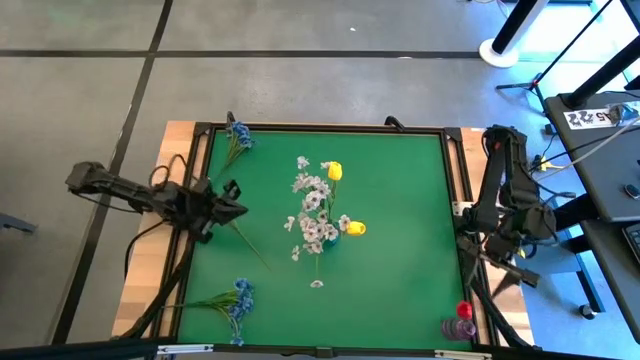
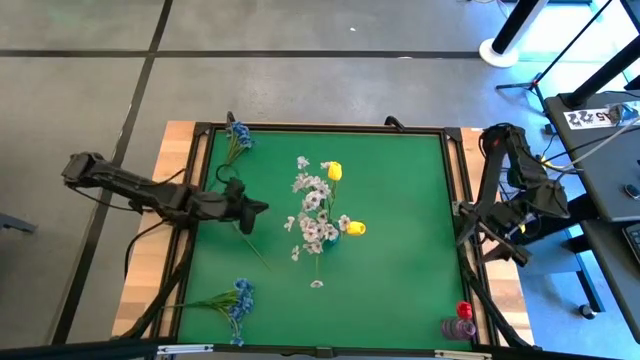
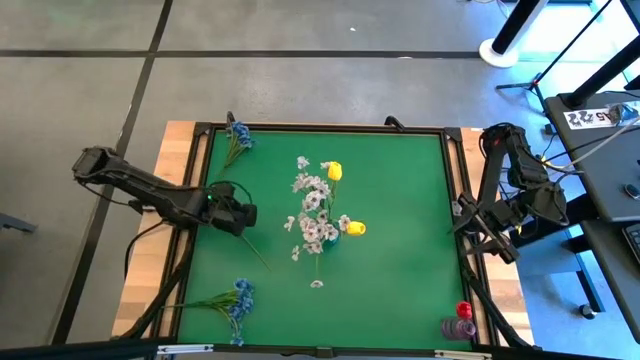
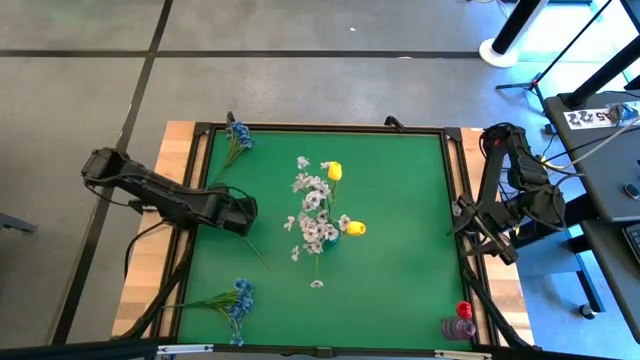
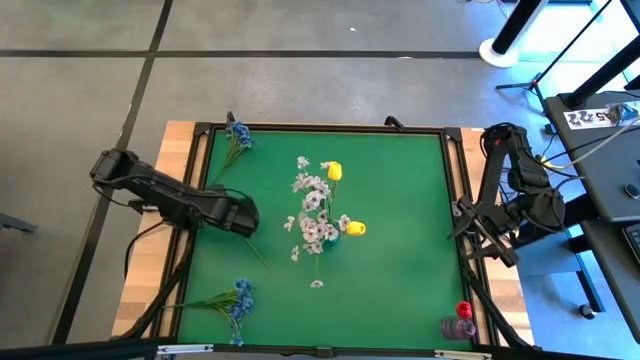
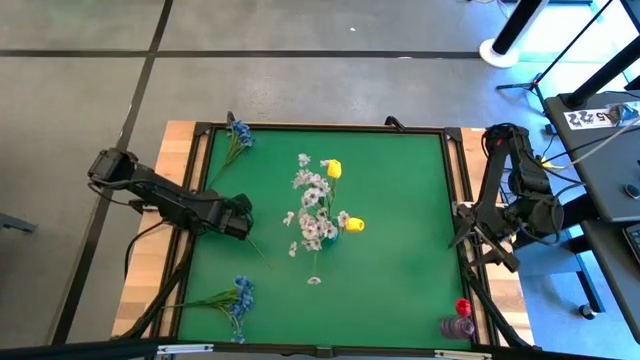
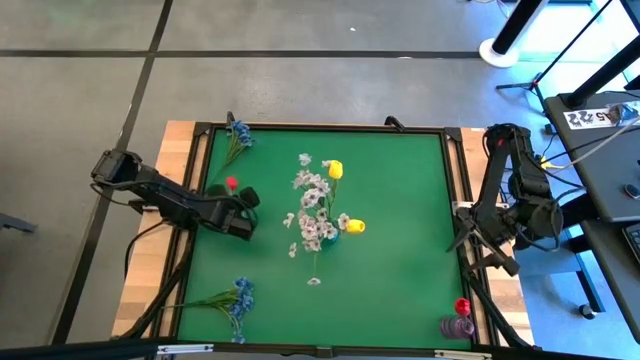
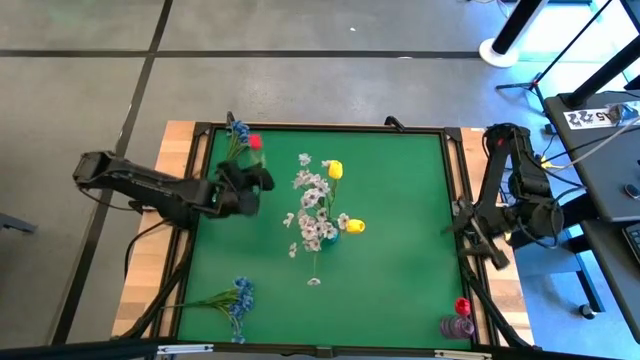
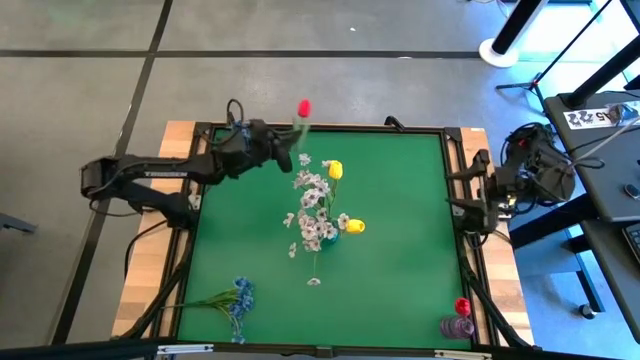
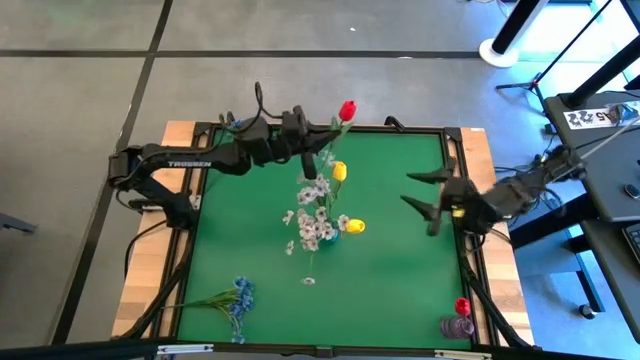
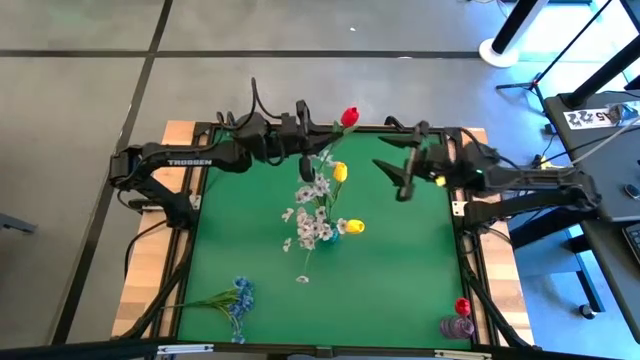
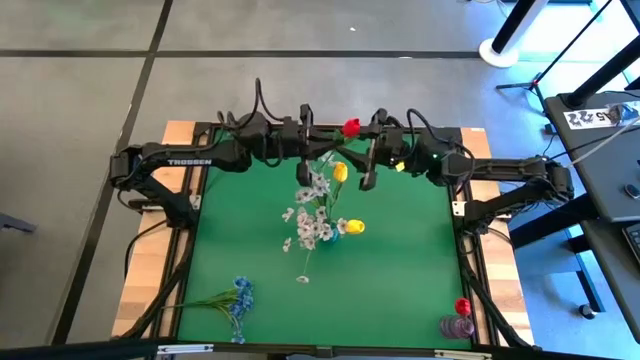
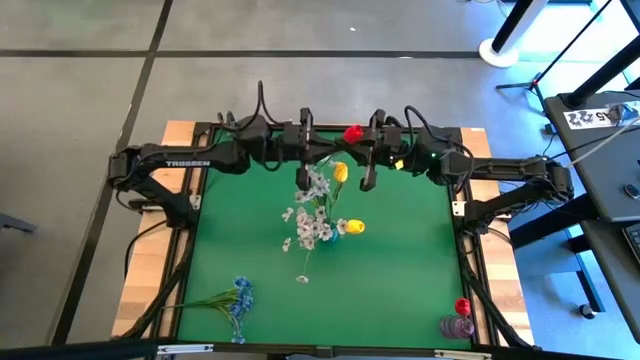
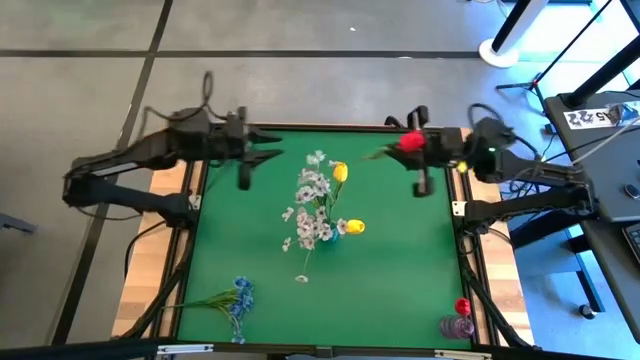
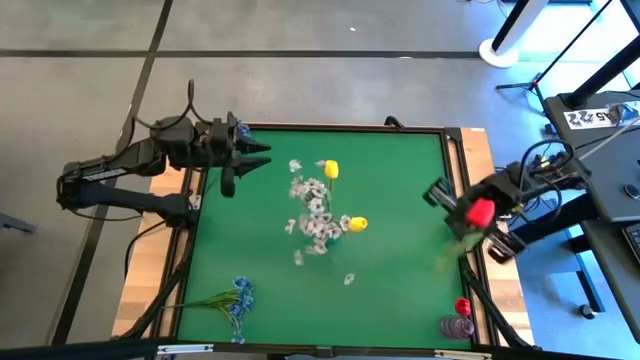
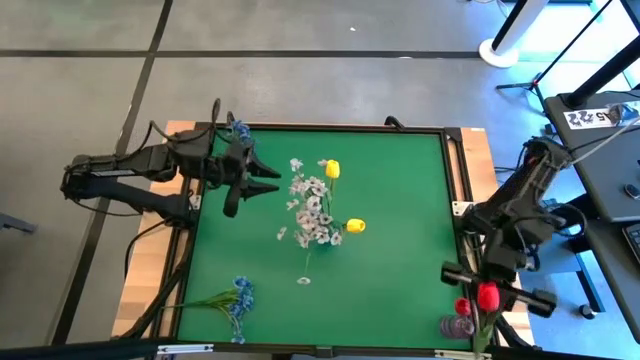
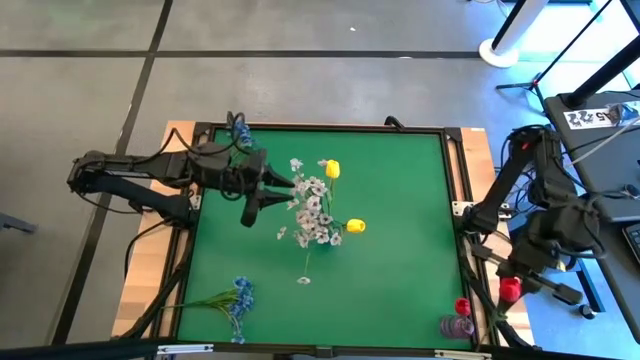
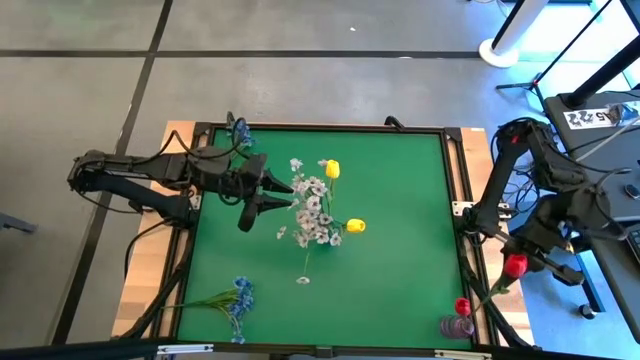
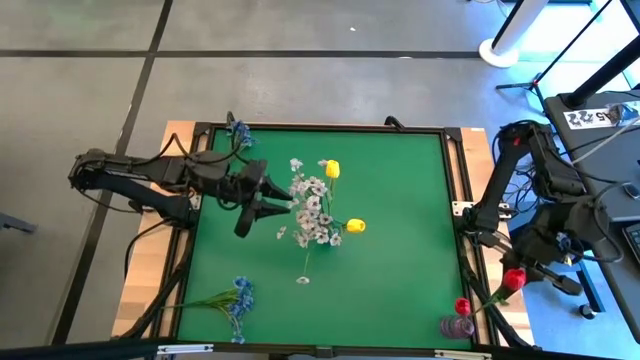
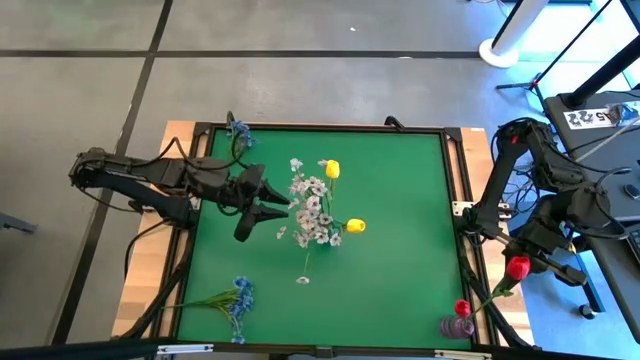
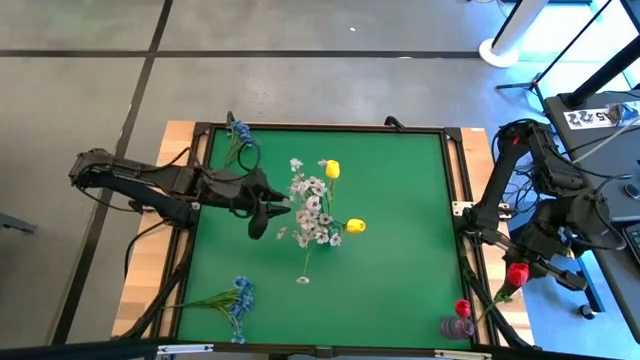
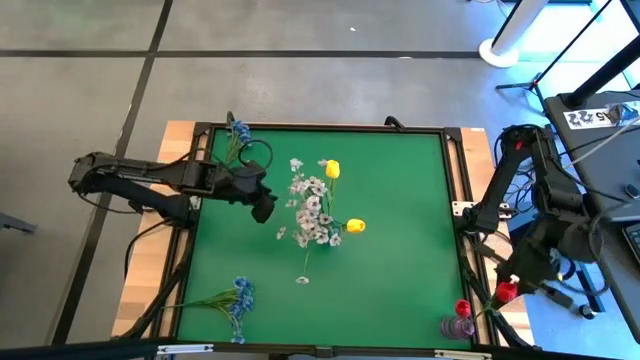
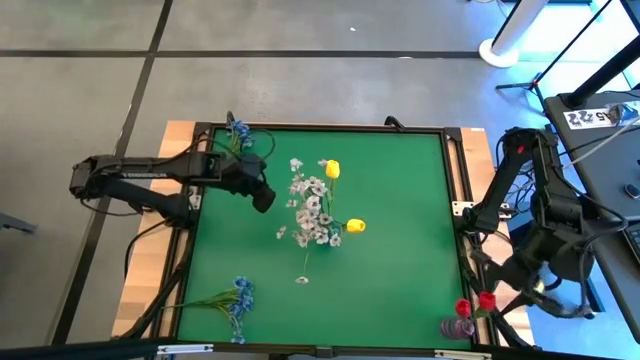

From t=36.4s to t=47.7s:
Task: Sort flowers into vase by color
Put the red flower into the purple vase

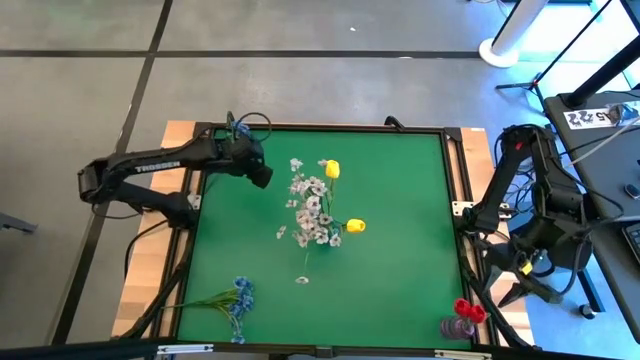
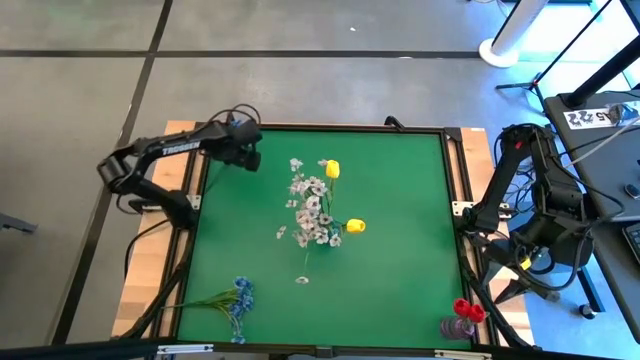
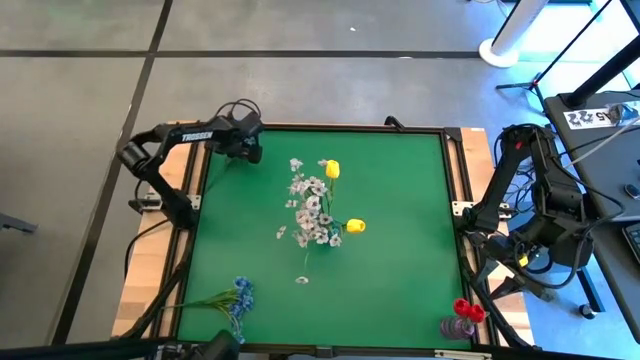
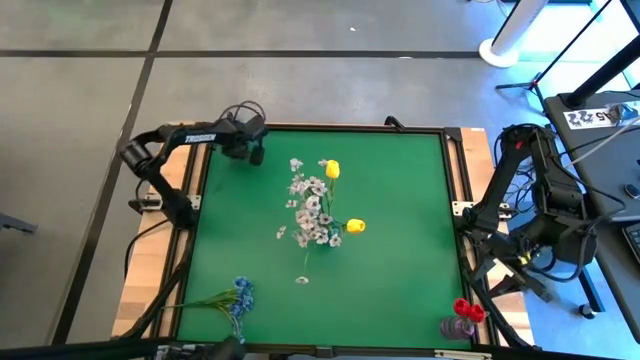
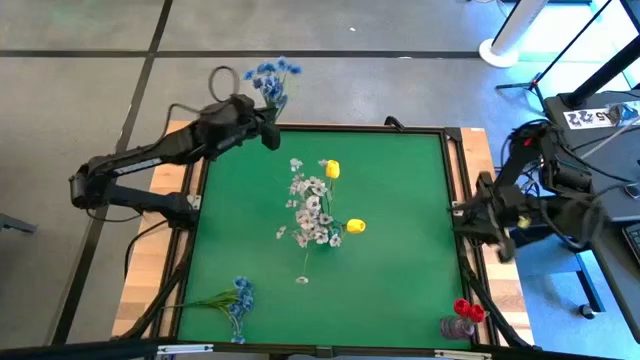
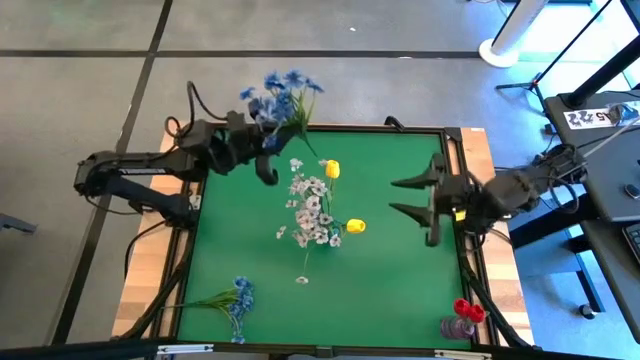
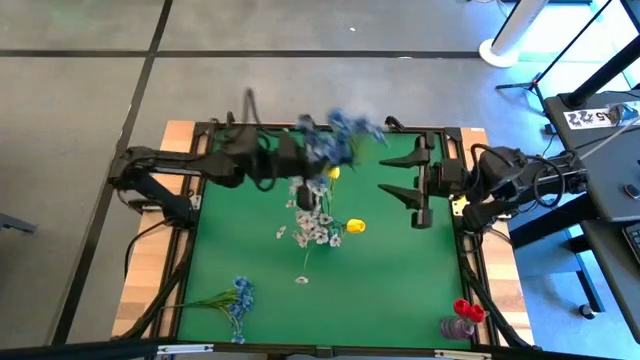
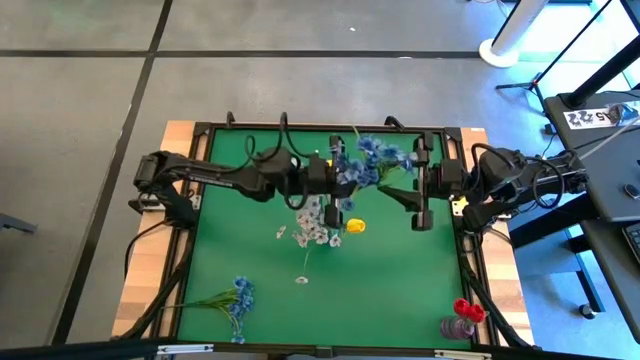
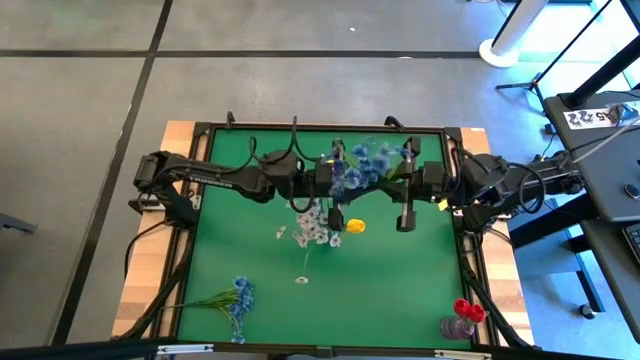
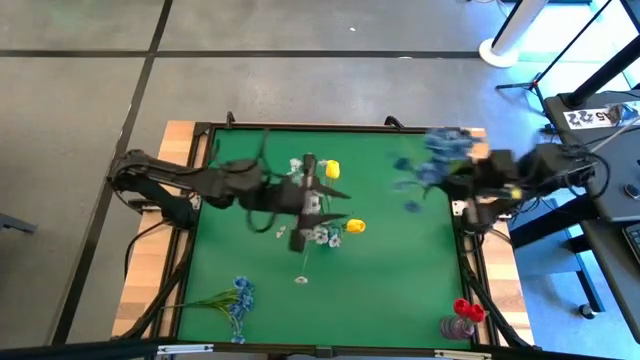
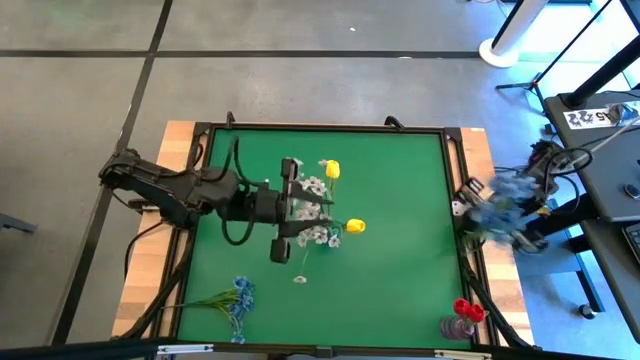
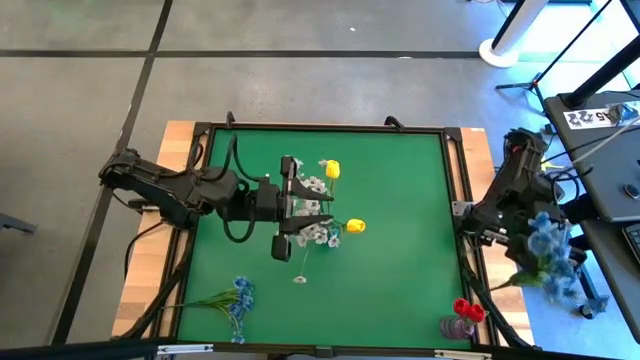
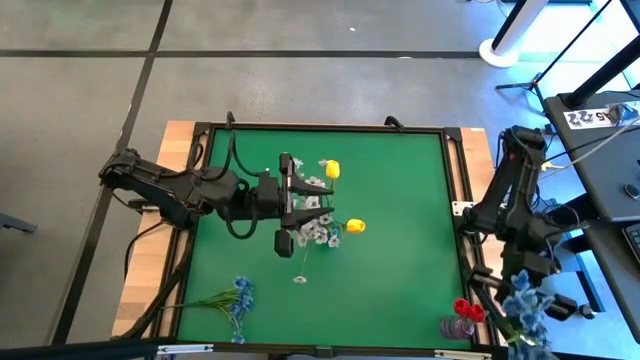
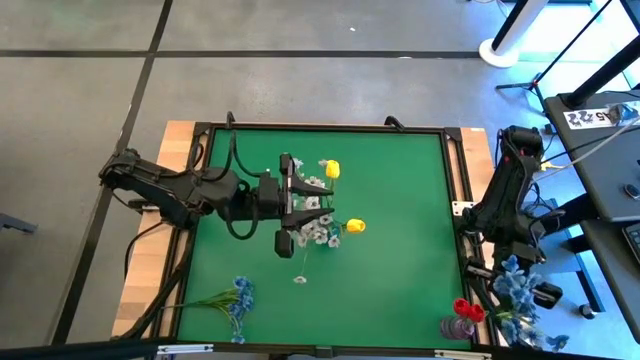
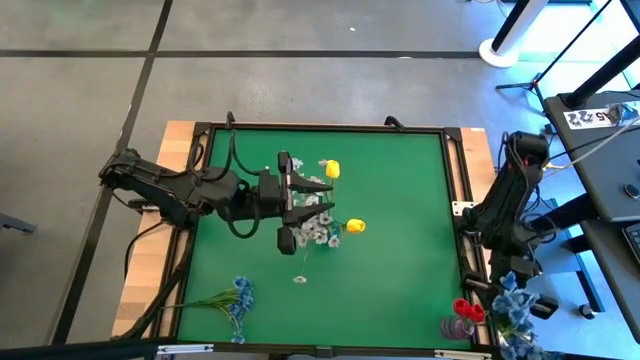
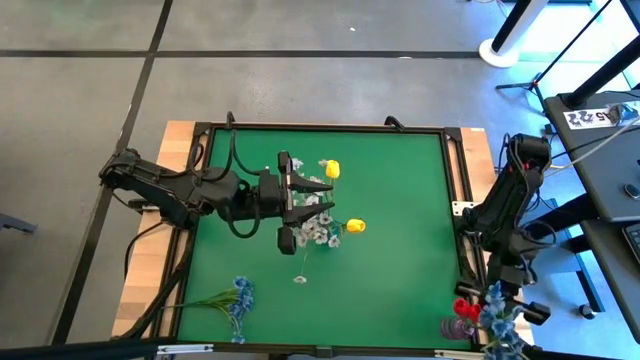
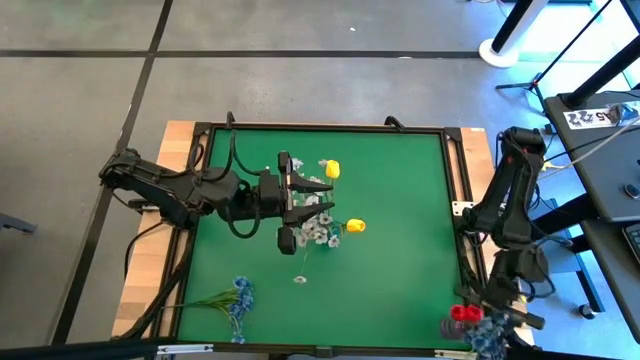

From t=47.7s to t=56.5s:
Put the top blue flowers into the purple vase
